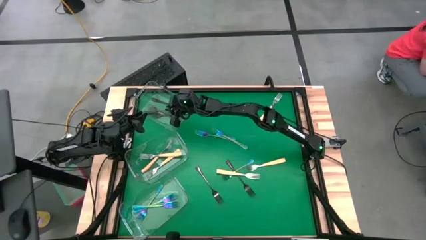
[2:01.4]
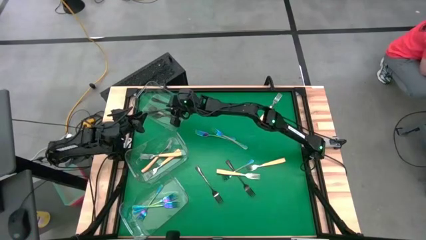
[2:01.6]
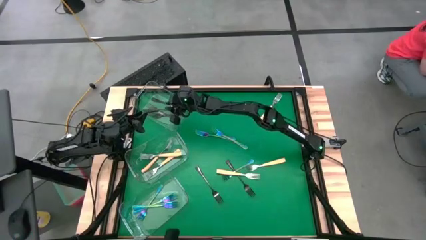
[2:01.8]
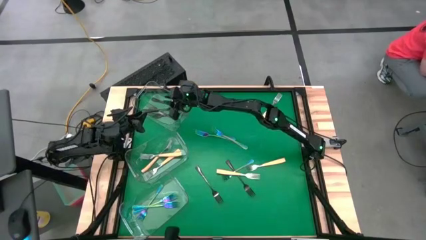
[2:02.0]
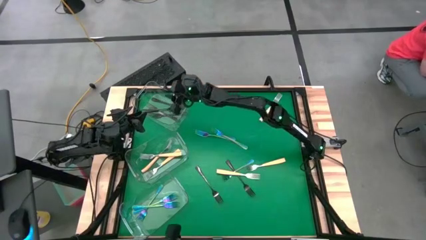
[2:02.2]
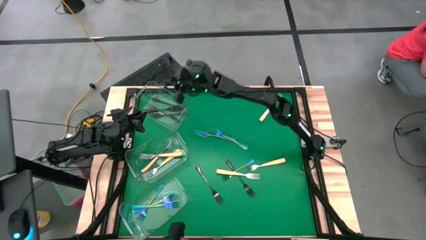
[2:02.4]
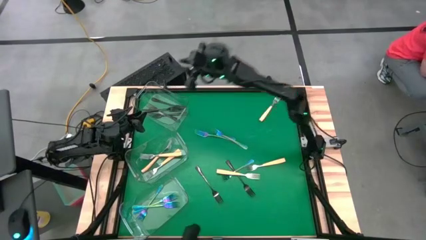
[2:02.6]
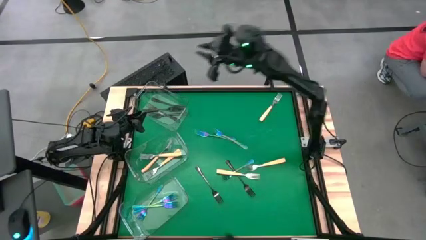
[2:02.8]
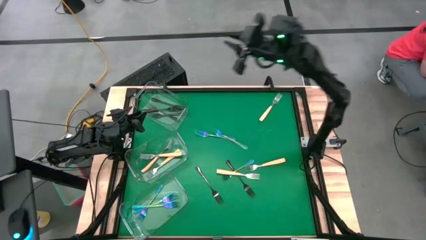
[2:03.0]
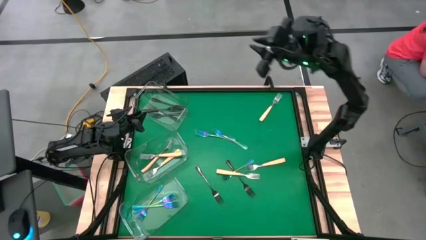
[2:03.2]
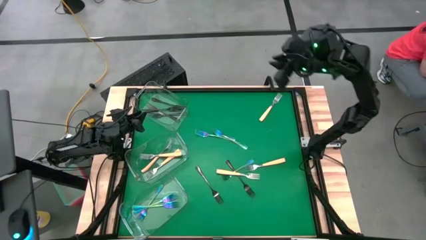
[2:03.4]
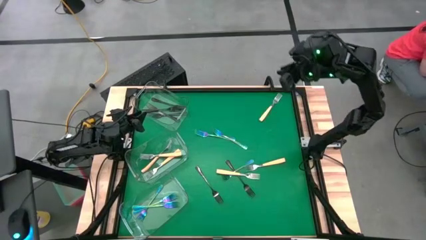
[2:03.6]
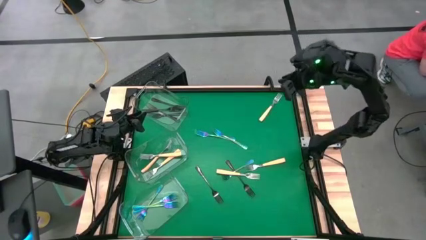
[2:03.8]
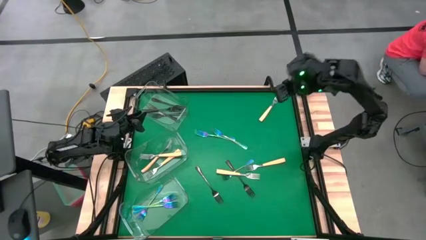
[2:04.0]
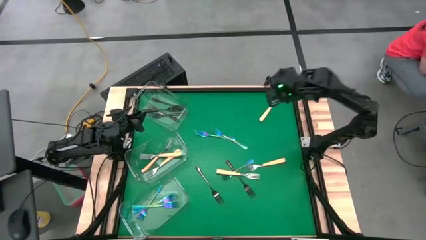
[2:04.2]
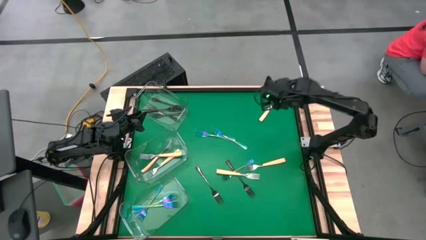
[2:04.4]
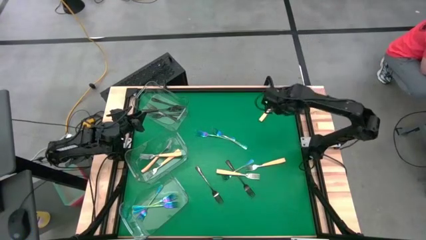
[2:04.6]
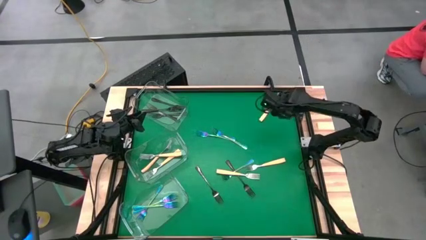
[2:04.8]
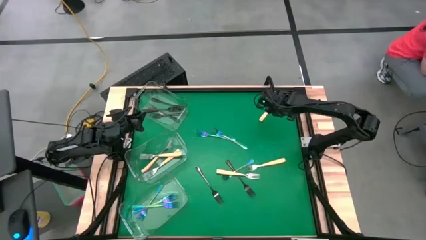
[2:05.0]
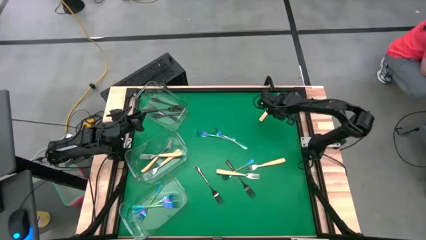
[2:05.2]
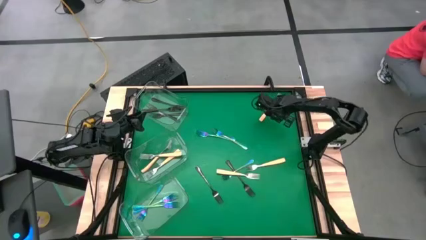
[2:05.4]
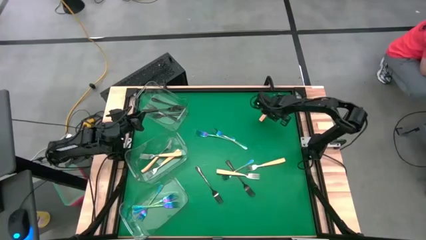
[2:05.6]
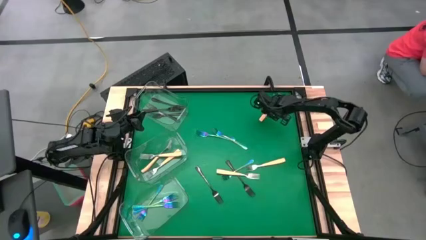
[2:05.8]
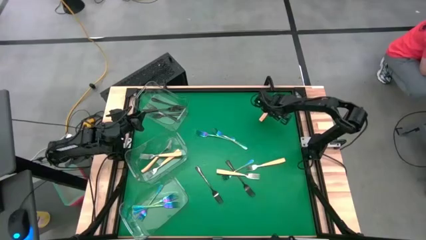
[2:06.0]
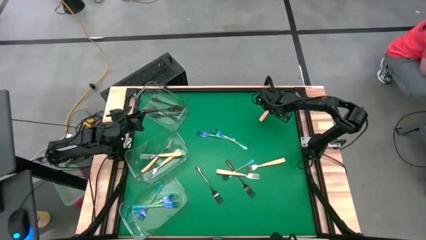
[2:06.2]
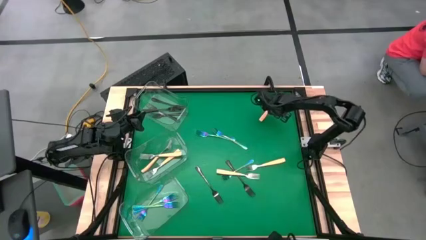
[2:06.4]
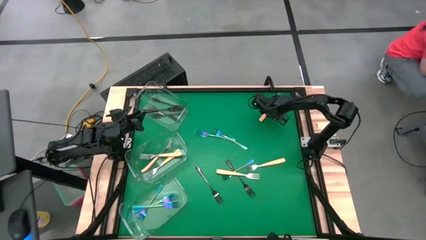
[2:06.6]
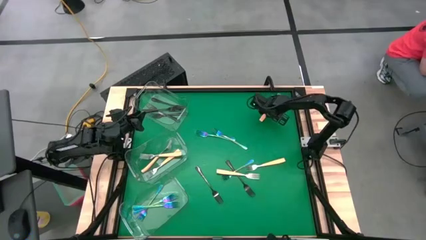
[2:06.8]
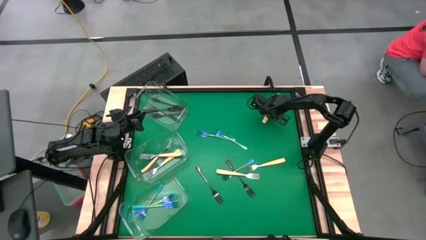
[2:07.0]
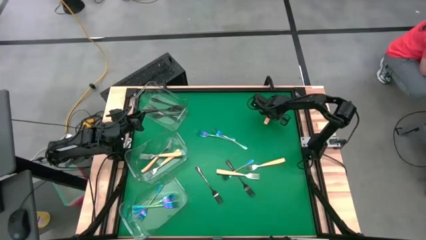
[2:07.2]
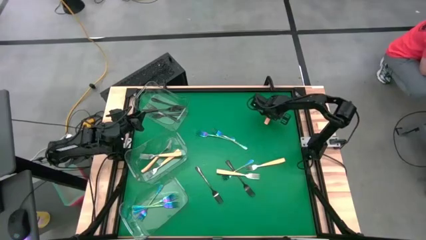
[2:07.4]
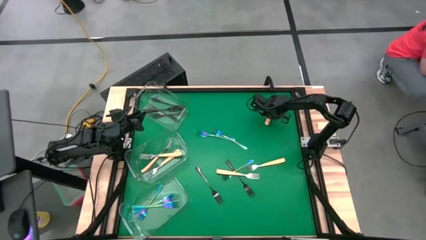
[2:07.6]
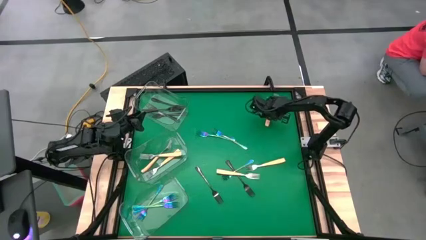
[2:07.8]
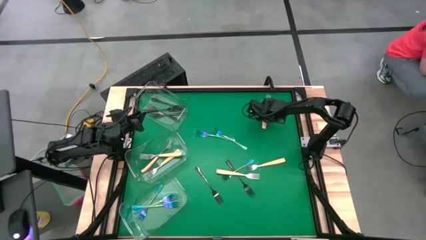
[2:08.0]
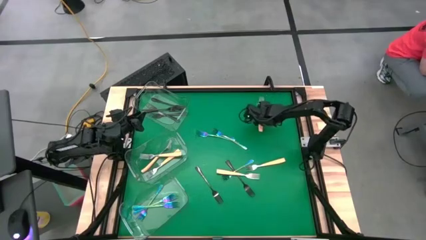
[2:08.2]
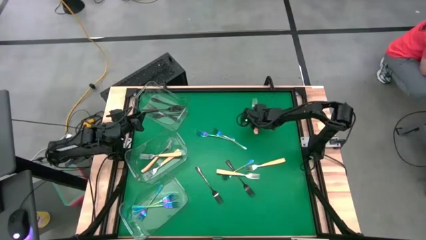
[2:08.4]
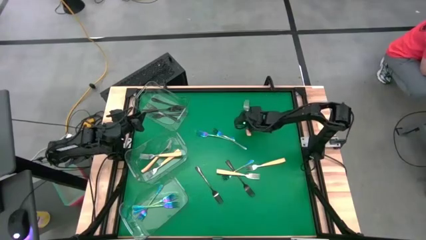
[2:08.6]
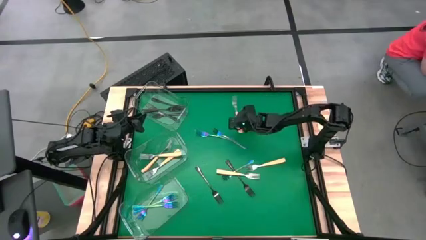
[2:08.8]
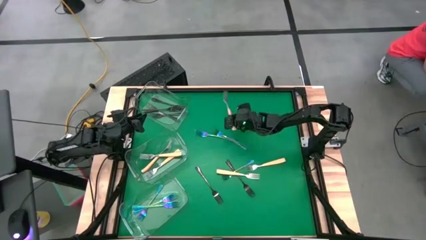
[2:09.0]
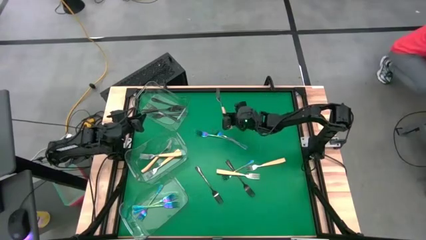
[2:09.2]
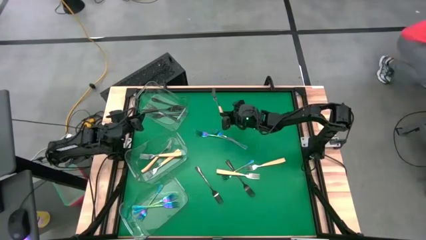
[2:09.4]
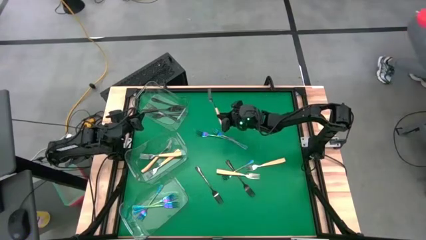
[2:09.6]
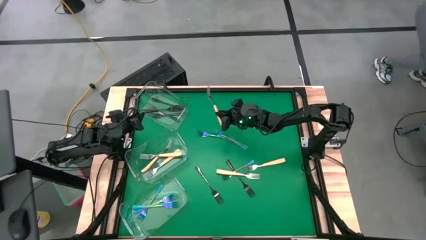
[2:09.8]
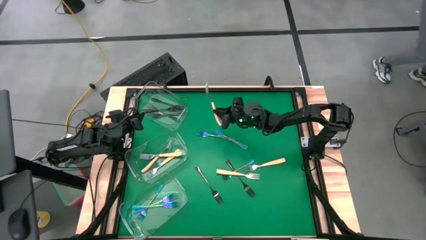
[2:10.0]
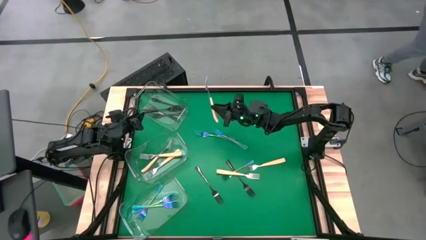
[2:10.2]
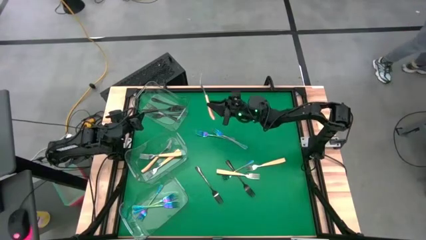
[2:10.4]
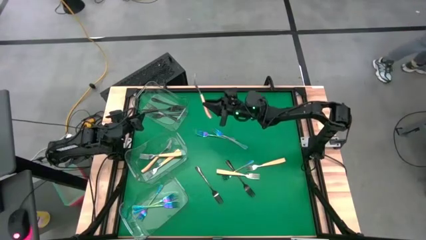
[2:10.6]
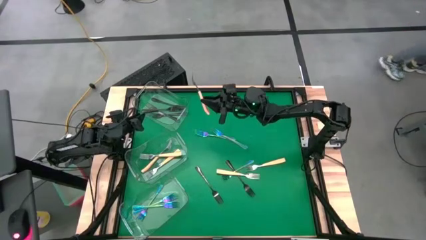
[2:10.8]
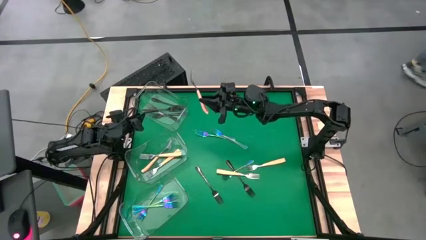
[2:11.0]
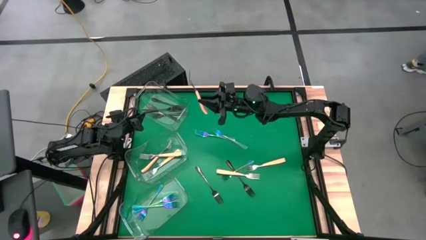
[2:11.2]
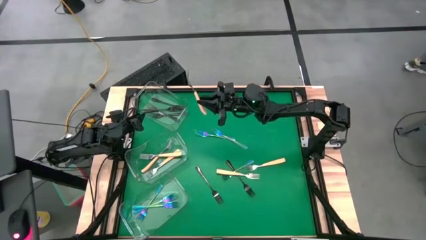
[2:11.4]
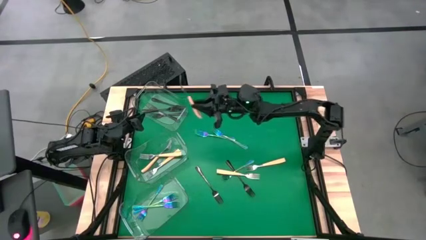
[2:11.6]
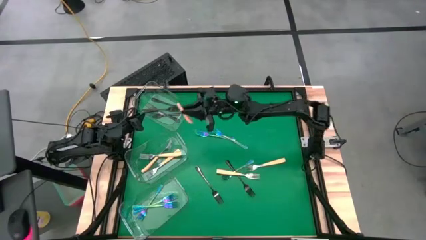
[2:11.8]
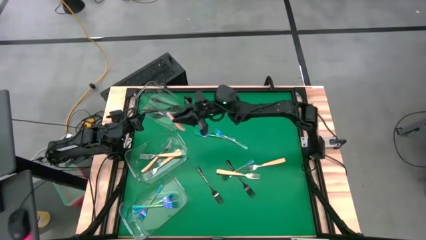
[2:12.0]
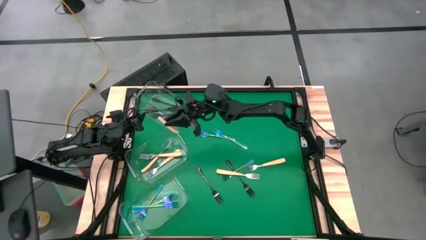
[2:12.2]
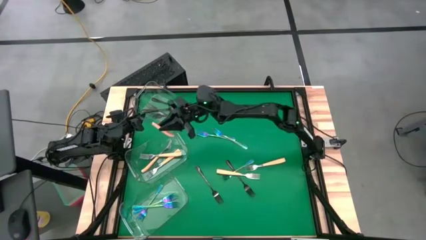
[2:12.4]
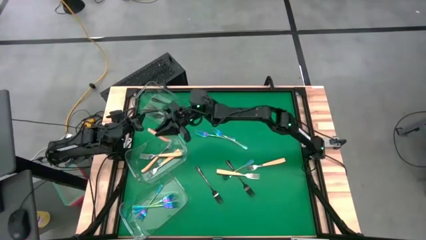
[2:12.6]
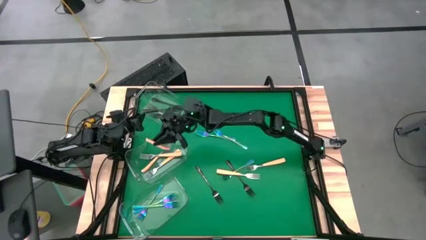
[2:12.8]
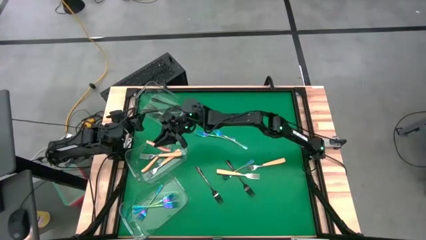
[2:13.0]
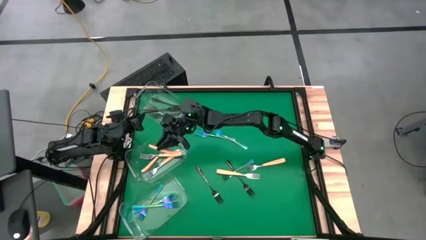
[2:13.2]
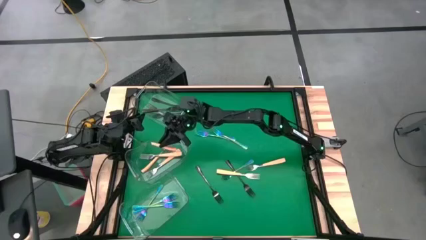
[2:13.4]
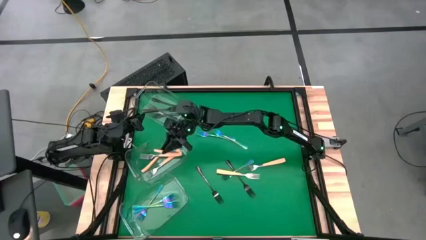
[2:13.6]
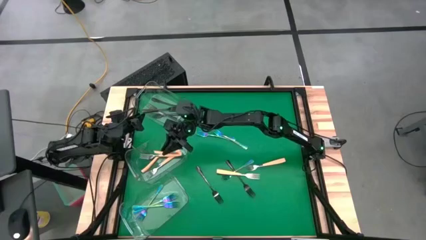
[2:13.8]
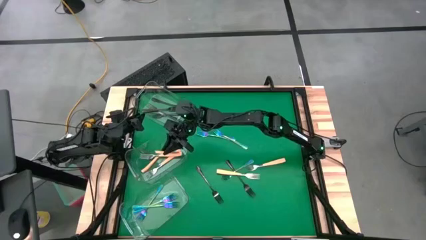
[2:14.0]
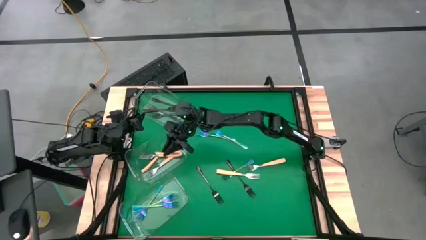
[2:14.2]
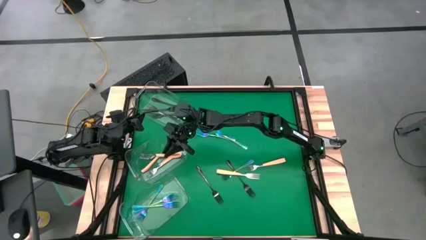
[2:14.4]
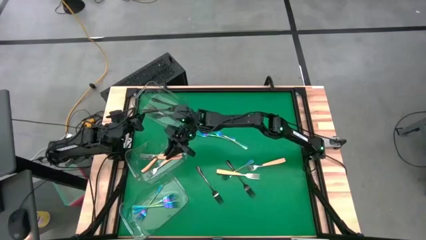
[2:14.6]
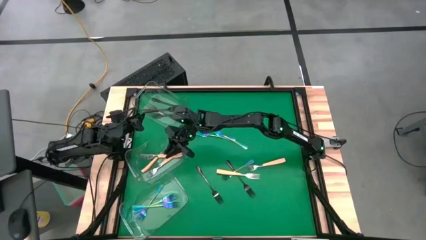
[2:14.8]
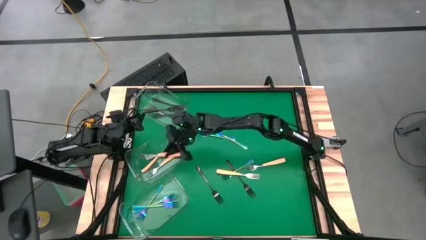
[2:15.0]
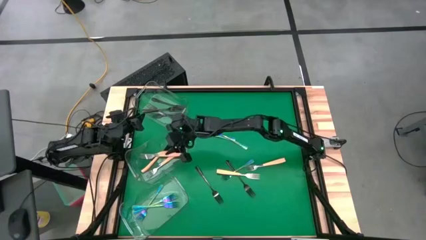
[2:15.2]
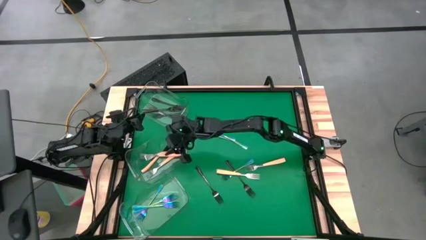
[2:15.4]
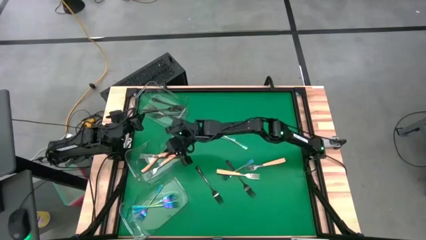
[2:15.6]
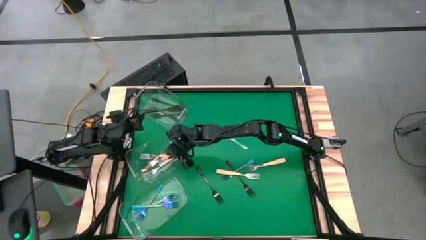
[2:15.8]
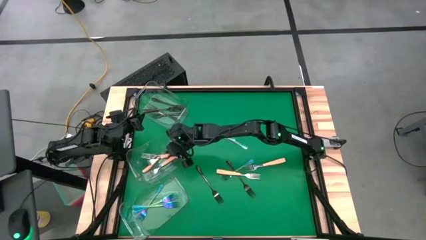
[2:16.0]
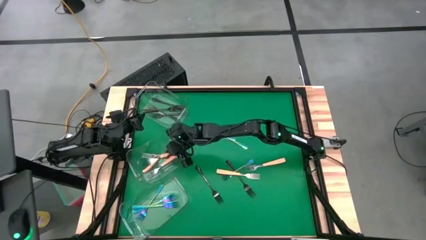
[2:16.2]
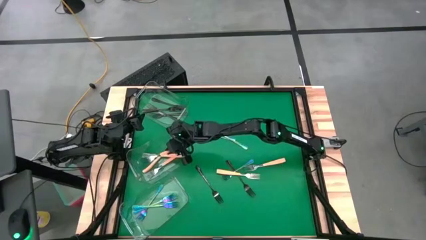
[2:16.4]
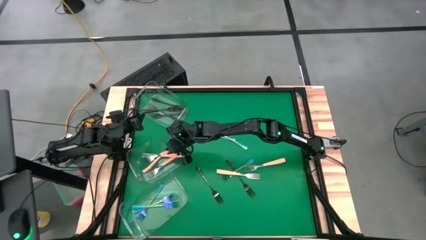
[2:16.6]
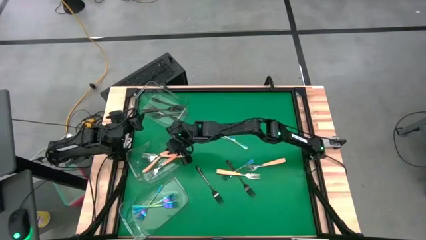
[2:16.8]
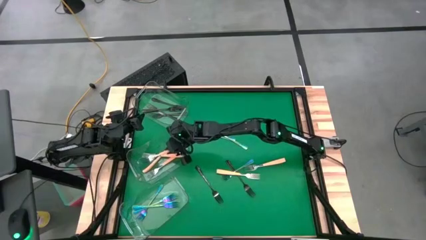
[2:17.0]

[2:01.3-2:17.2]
Task: Sort silverware by color (type)
Put the orange fork into the middle transparent bin
